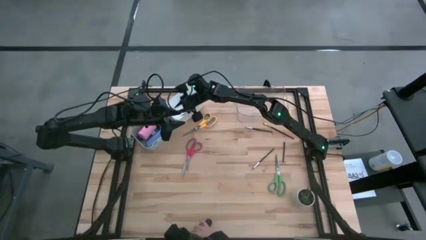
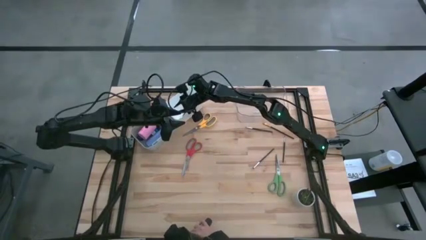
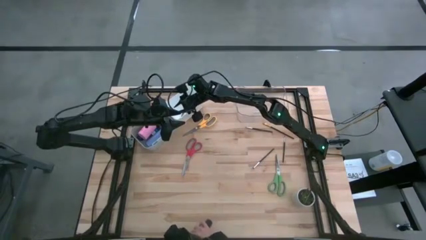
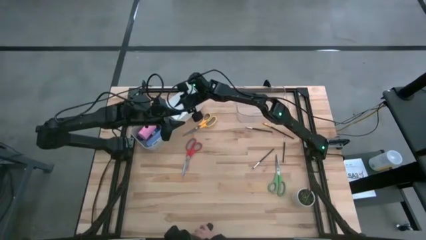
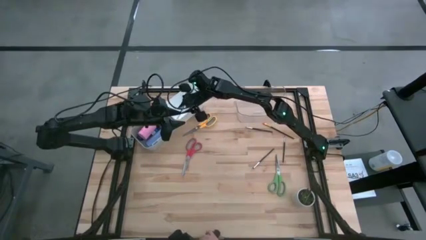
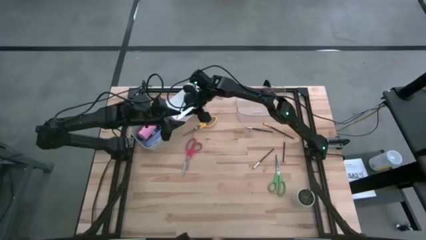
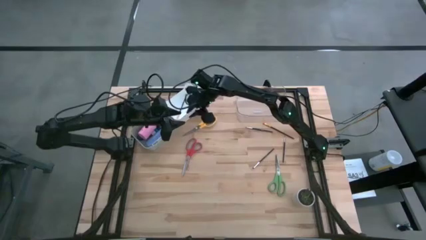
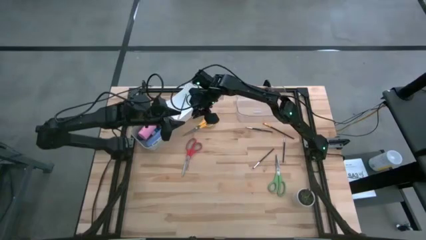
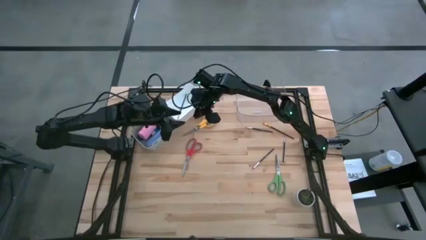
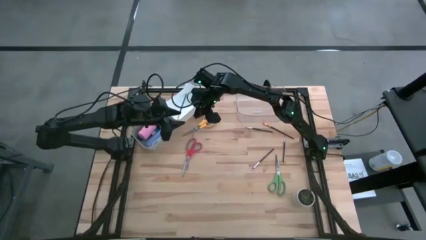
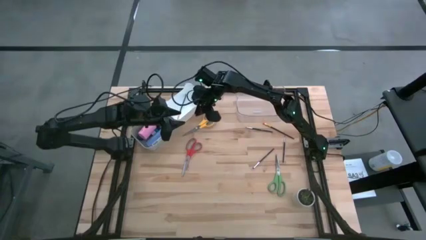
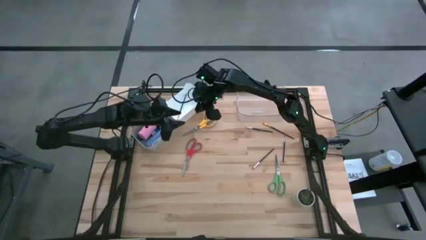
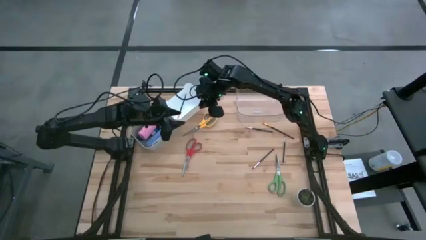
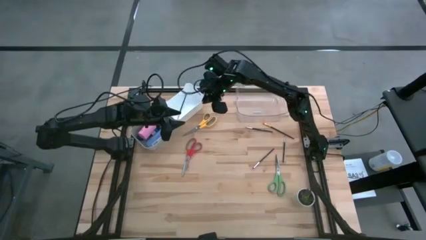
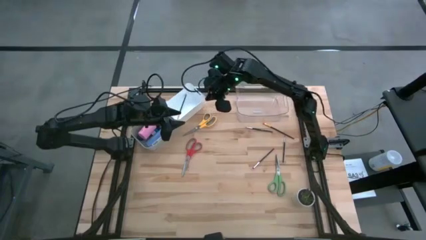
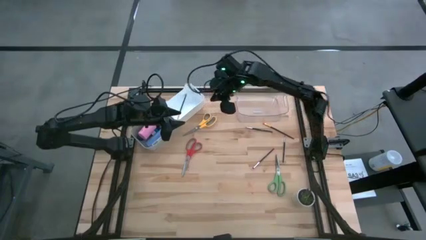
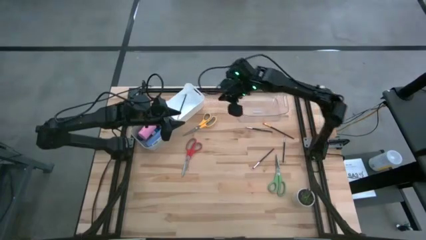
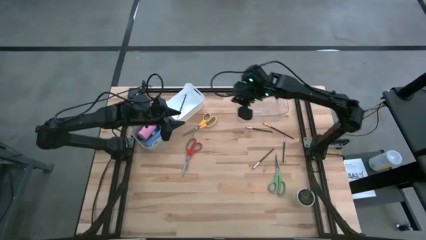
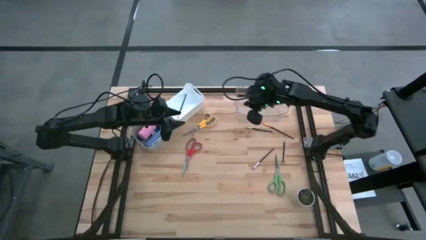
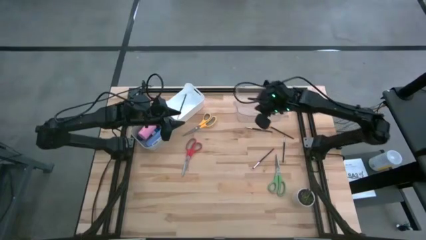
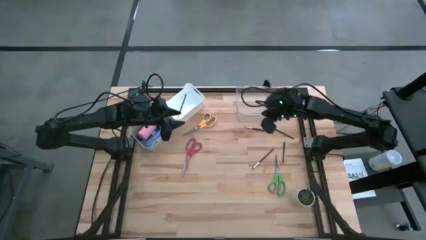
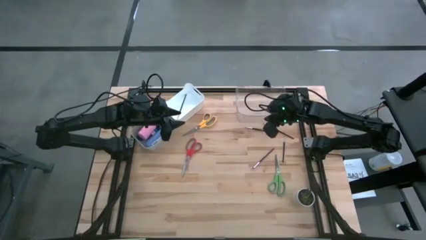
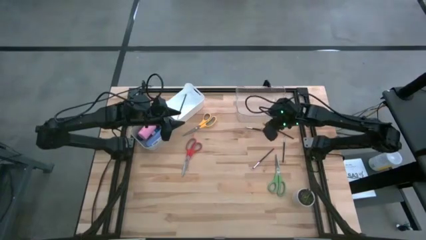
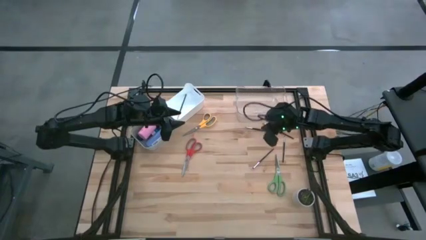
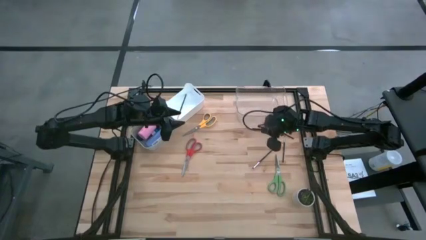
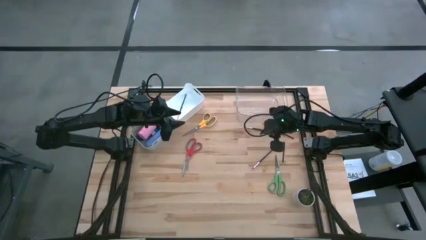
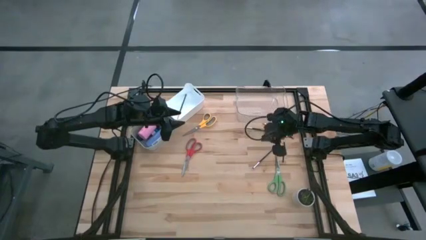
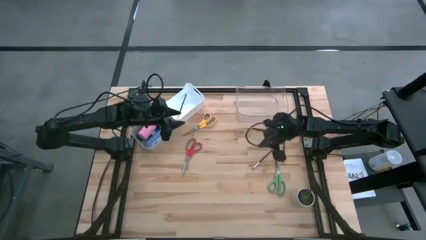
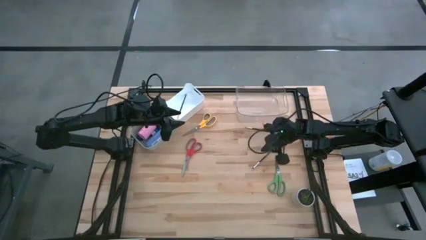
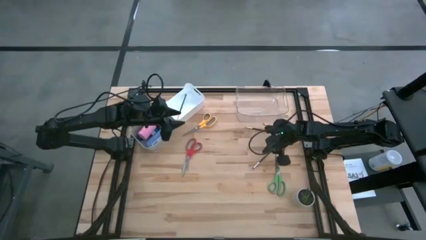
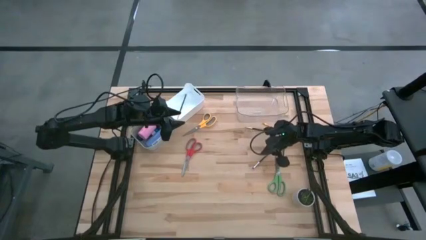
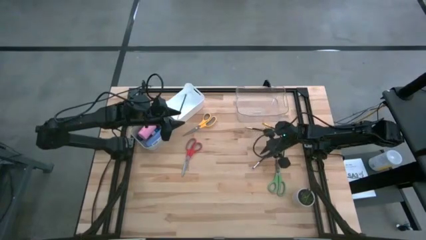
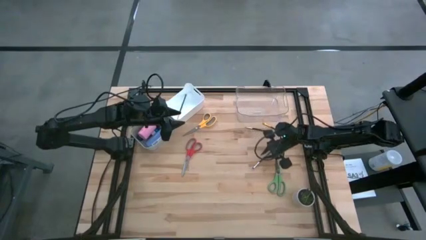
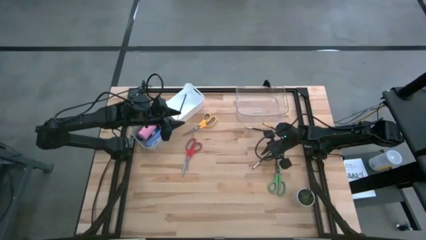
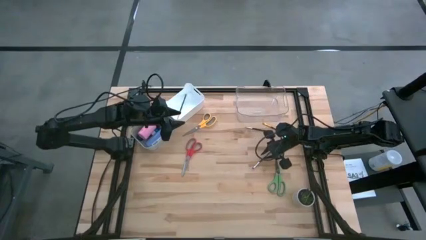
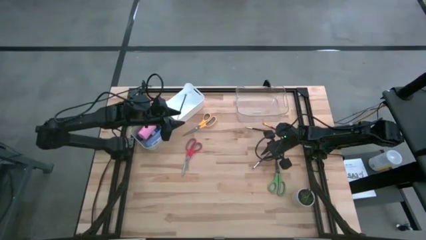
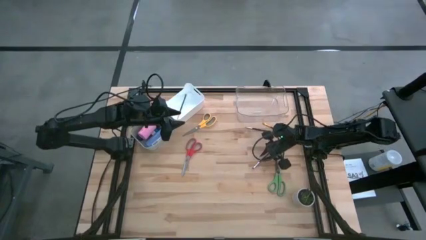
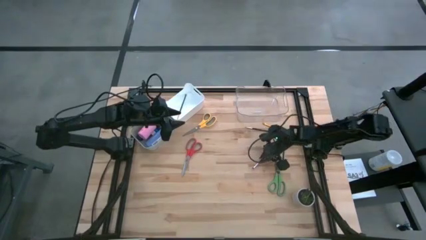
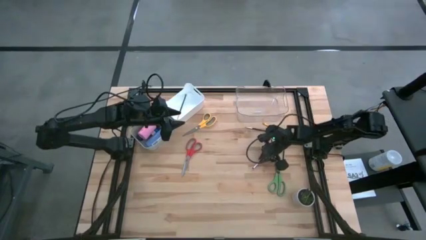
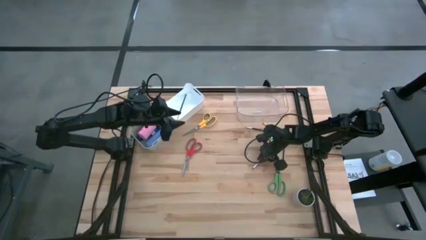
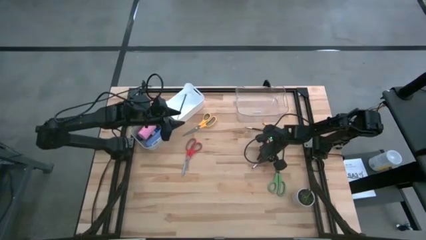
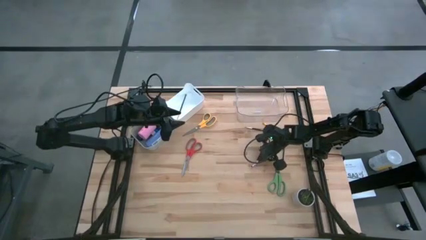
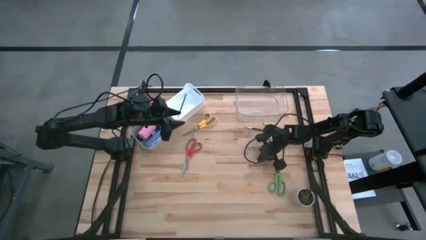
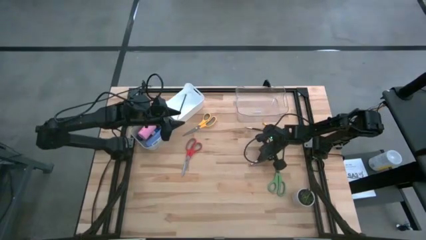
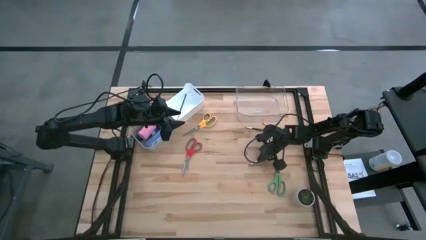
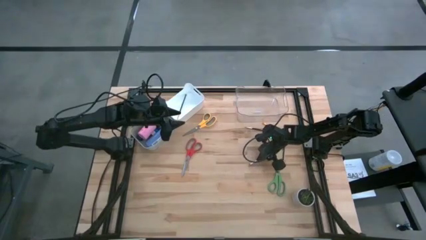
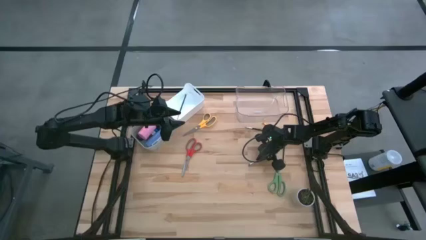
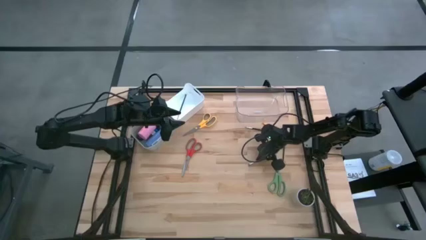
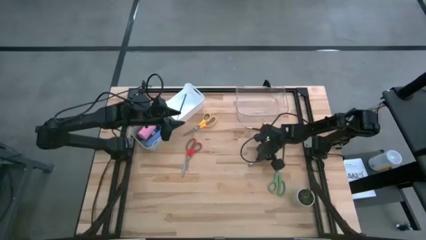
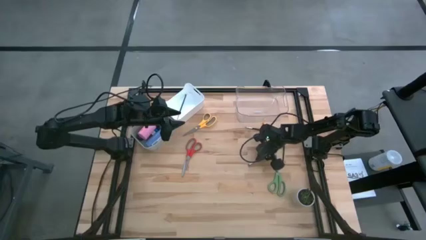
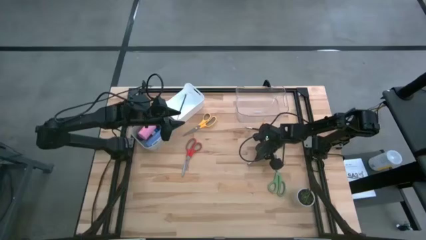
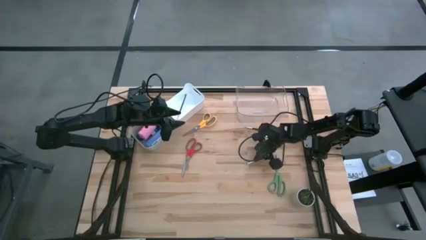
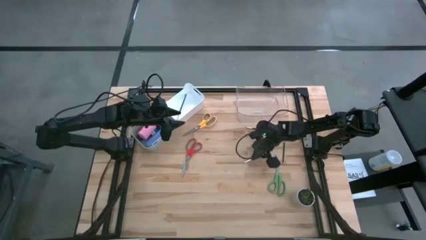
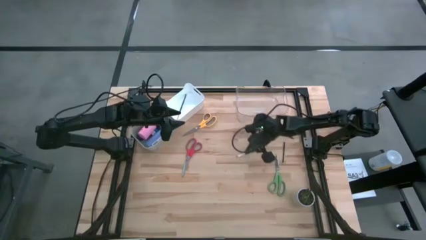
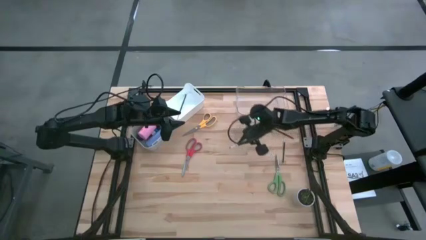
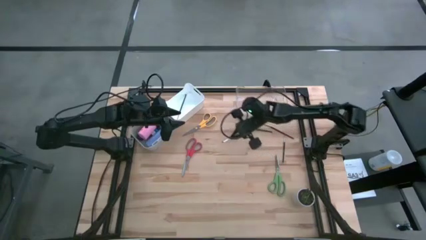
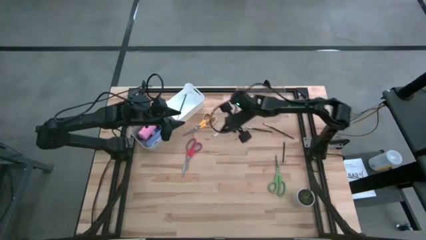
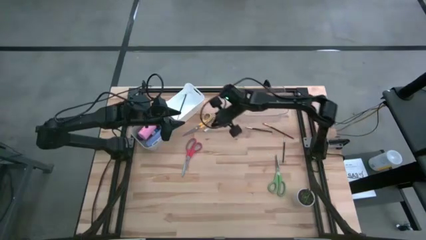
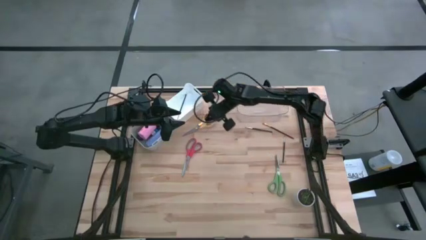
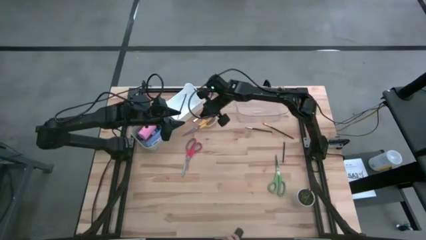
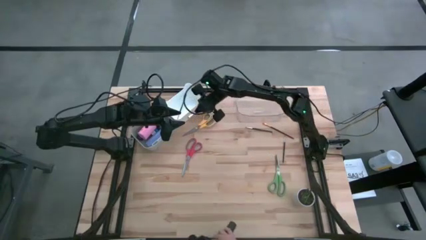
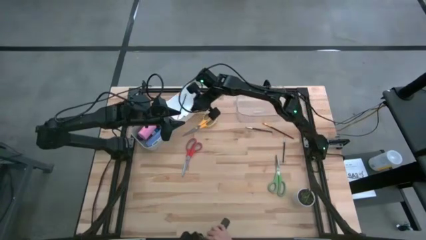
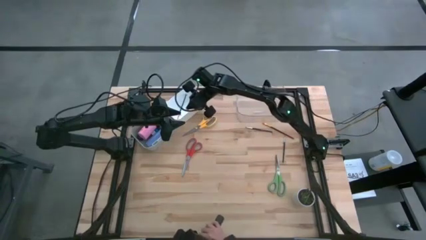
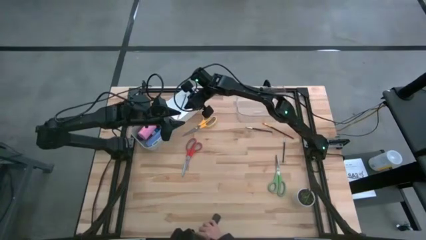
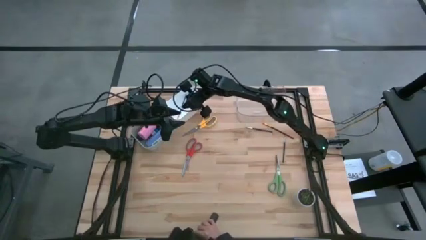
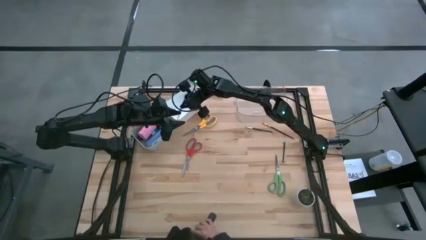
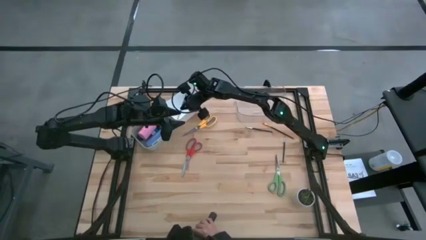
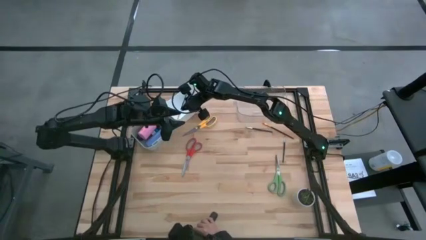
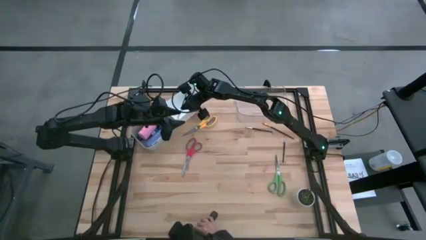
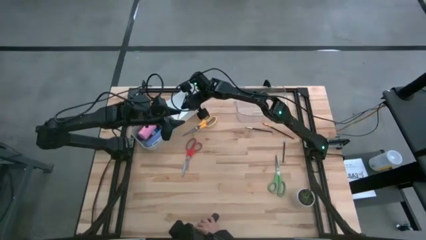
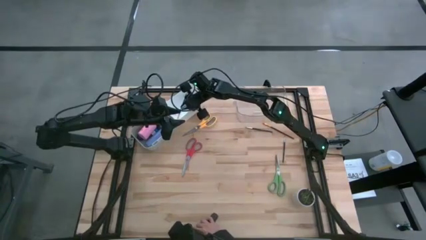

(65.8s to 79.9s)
Task: Pick & Place Paint Supplies
Put the bottom left silver paint brush into the white bin
